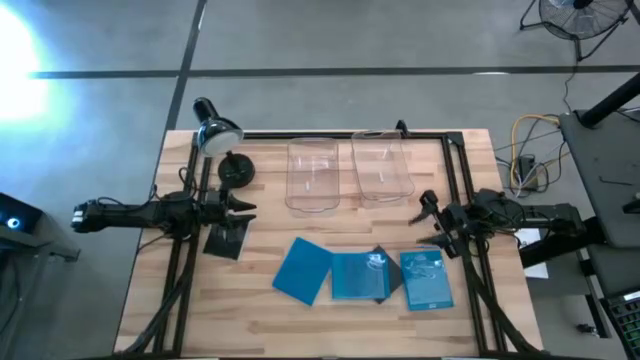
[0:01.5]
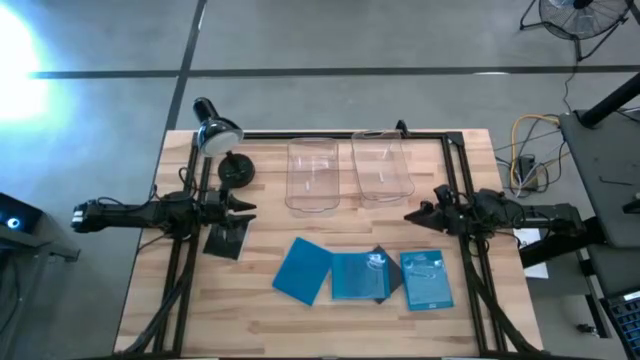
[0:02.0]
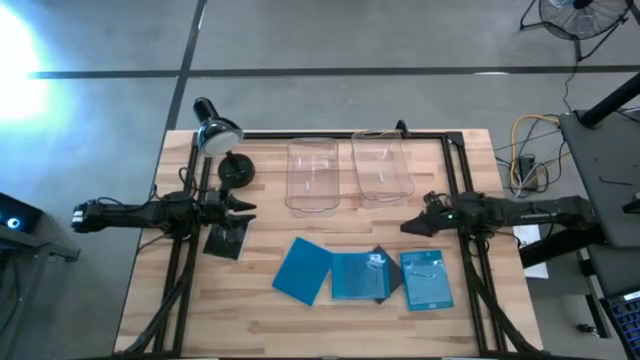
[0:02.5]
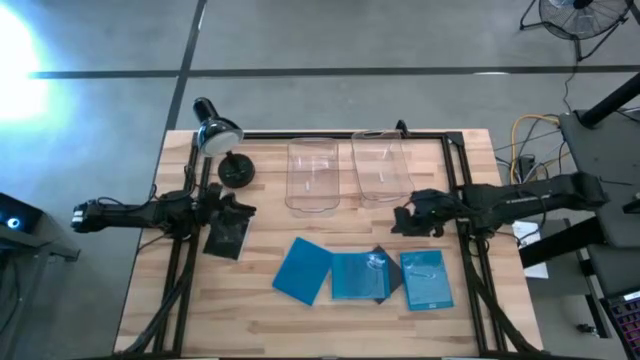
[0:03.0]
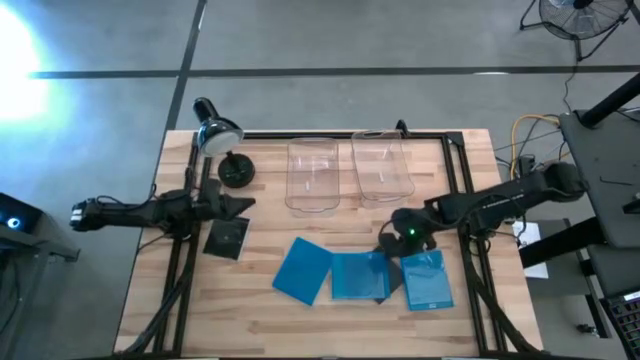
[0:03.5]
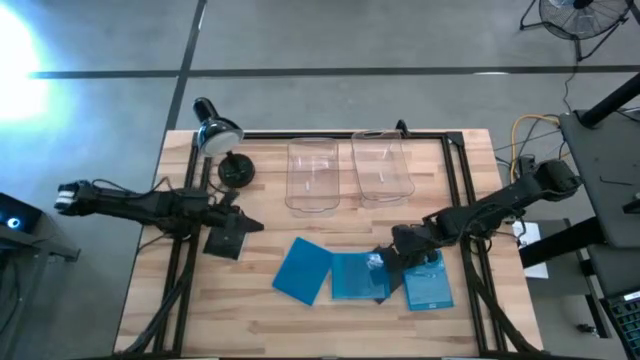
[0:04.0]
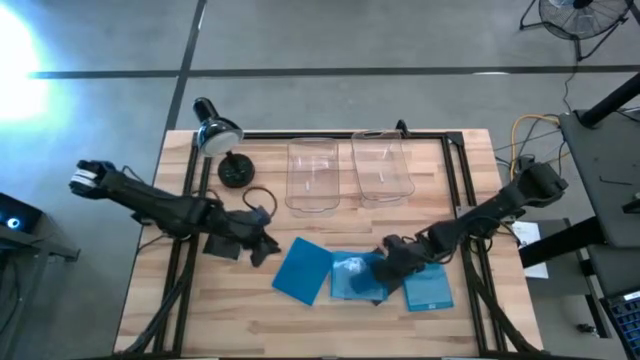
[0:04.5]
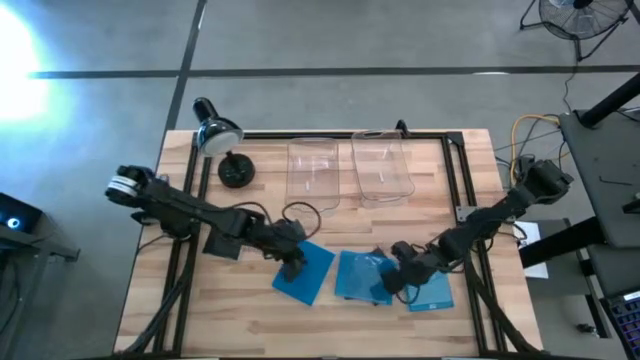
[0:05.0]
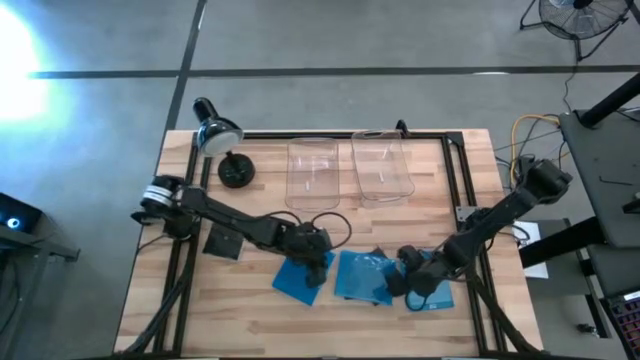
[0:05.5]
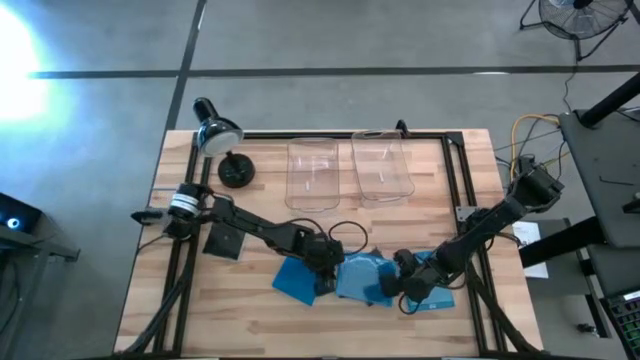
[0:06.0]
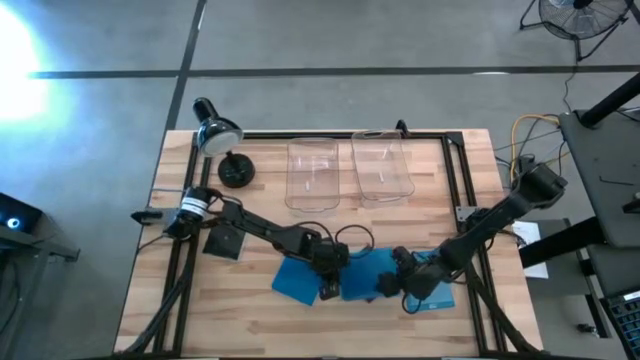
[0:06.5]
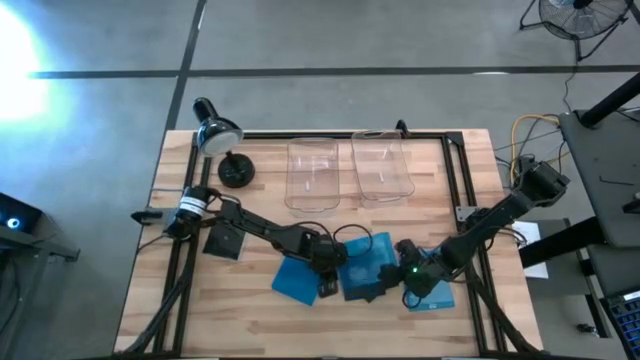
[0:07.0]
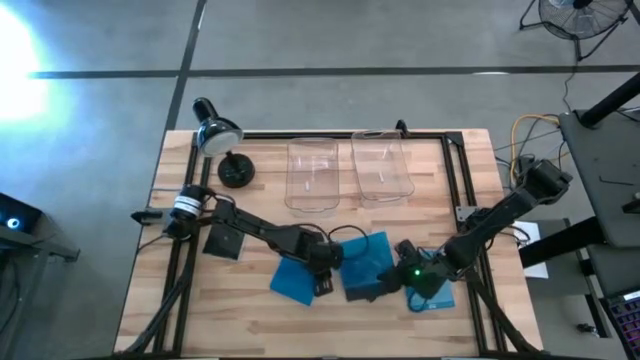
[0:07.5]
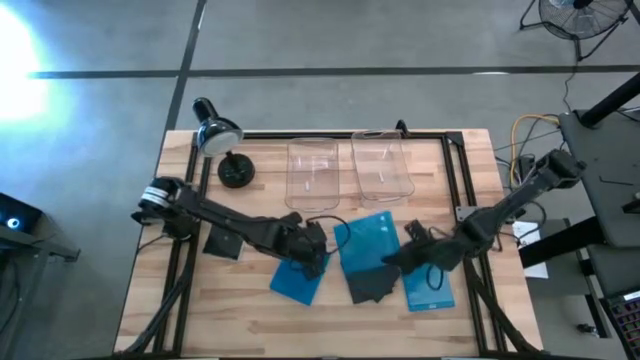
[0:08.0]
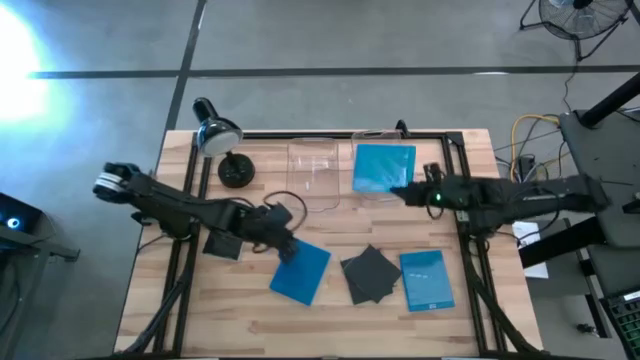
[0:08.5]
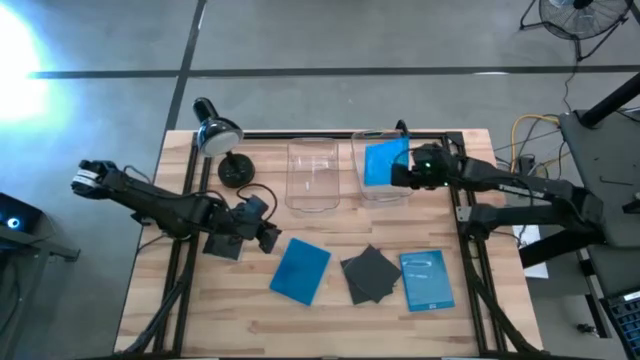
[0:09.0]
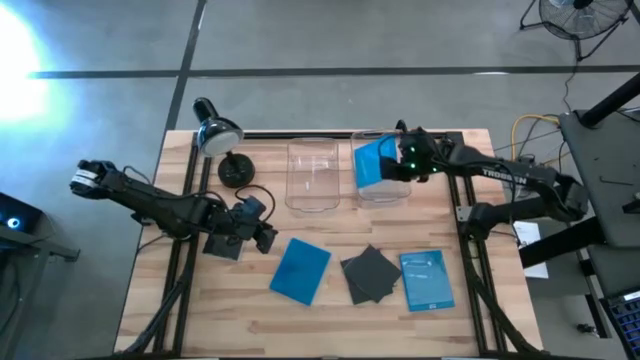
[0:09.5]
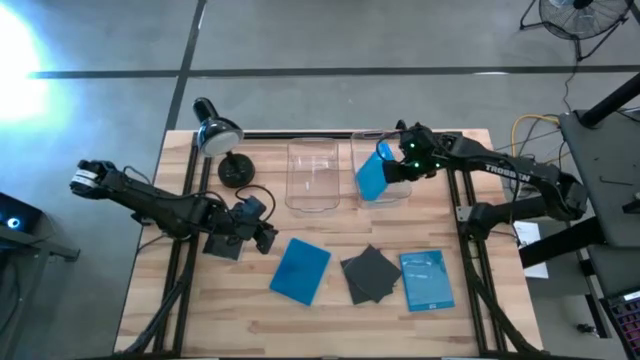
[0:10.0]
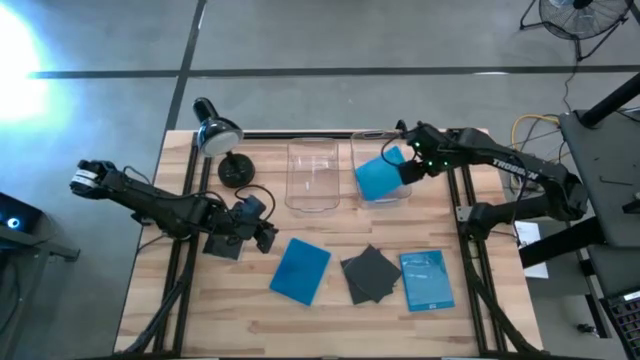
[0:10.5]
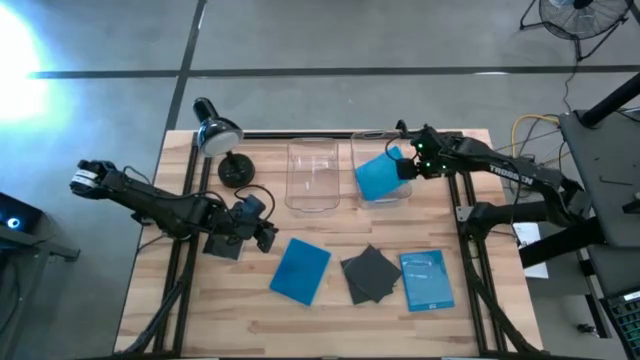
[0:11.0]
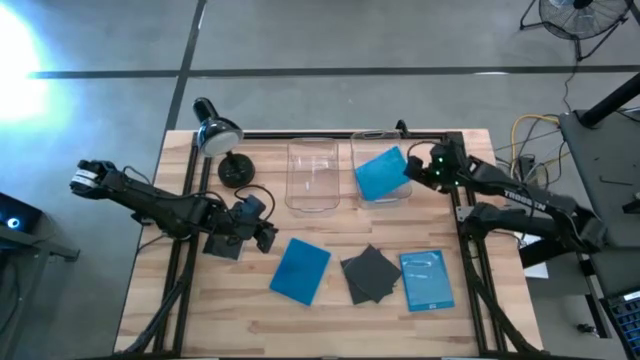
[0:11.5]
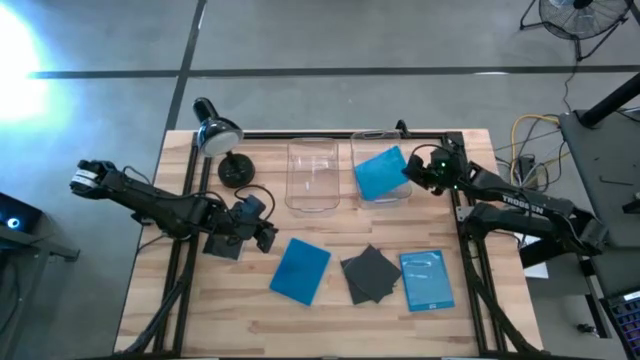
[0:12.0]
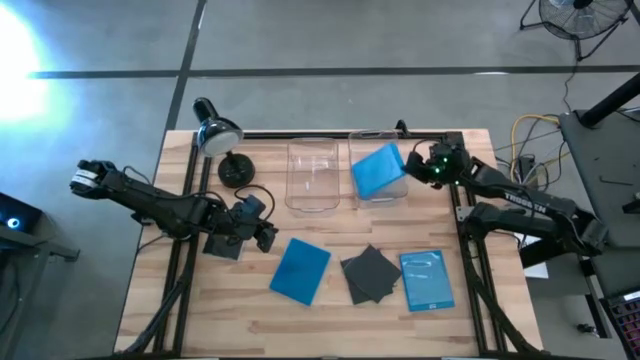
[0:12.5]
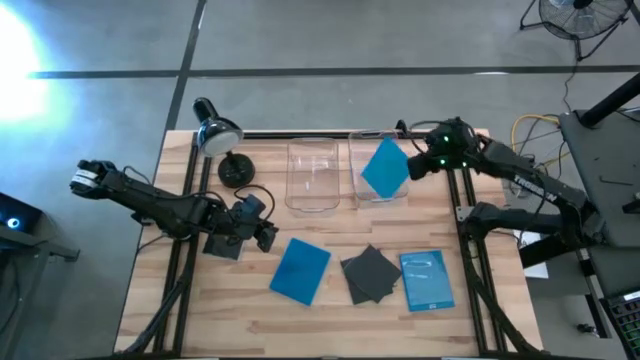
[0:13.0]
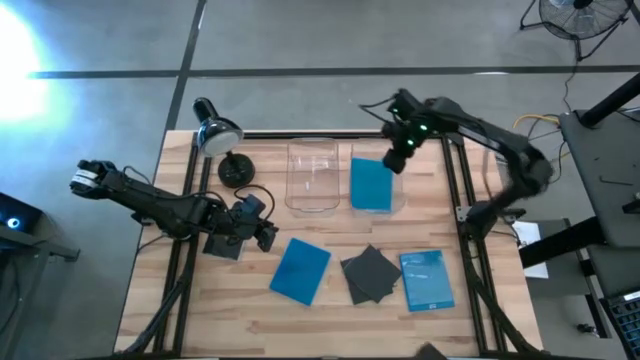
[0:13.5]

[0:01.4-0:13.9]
Task: Pick & place jewel cases by type
Put the blue CD case into the right transparent bin

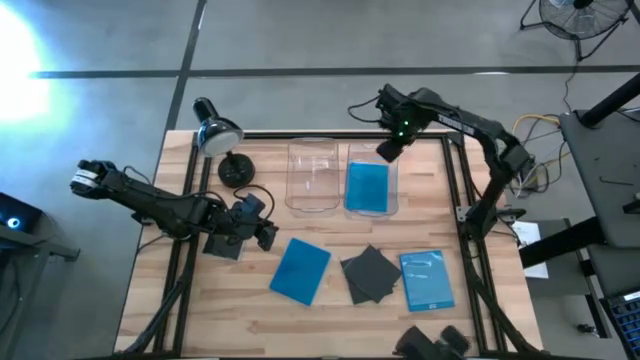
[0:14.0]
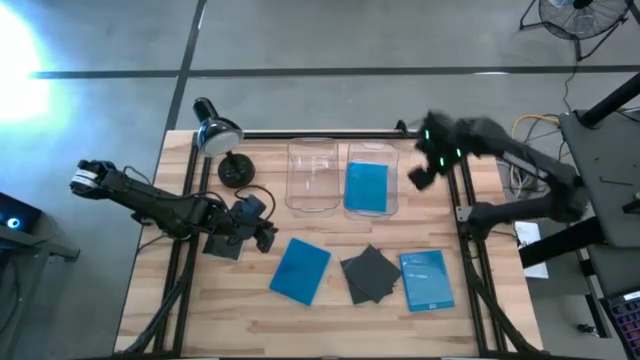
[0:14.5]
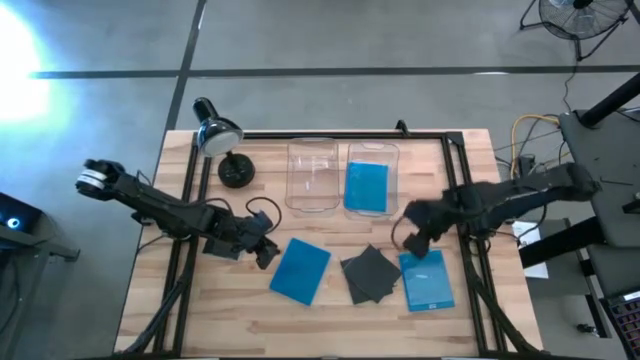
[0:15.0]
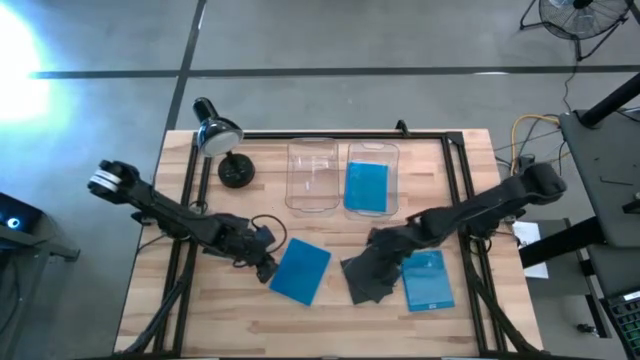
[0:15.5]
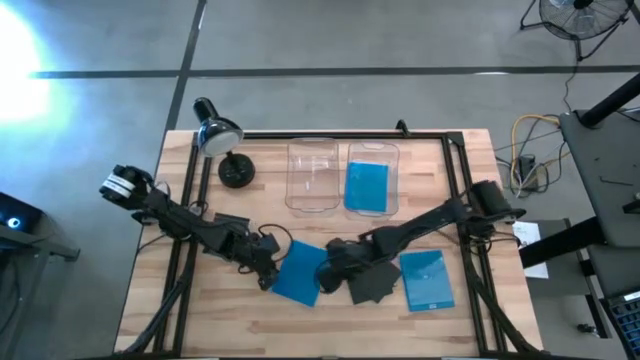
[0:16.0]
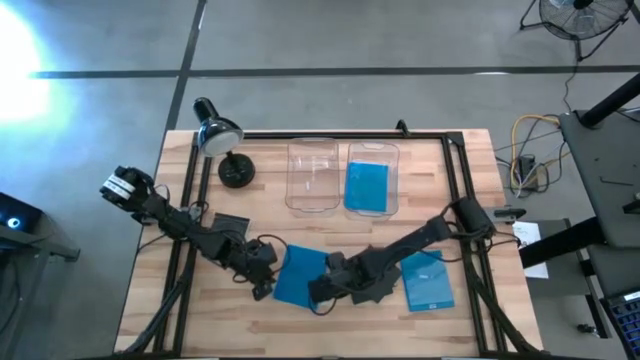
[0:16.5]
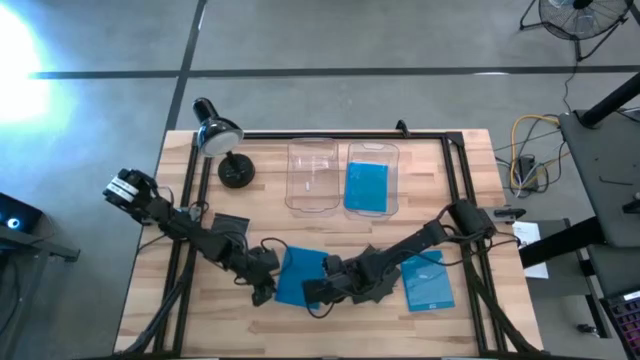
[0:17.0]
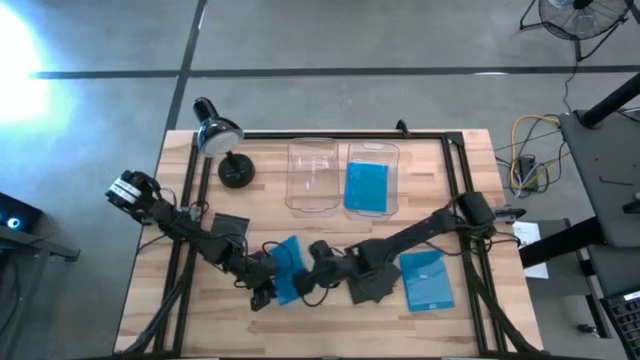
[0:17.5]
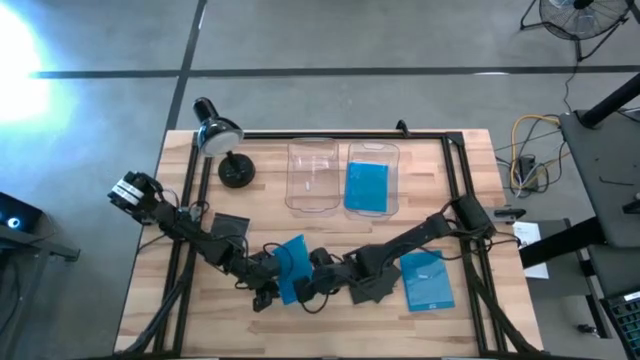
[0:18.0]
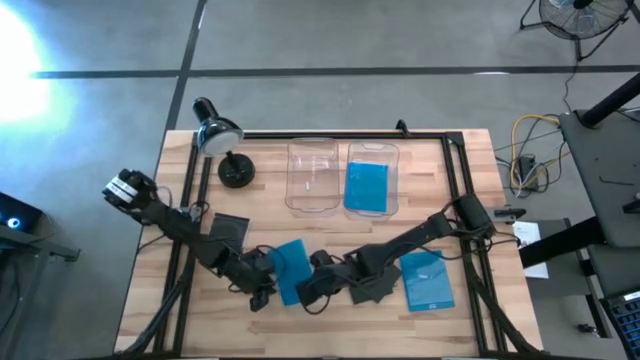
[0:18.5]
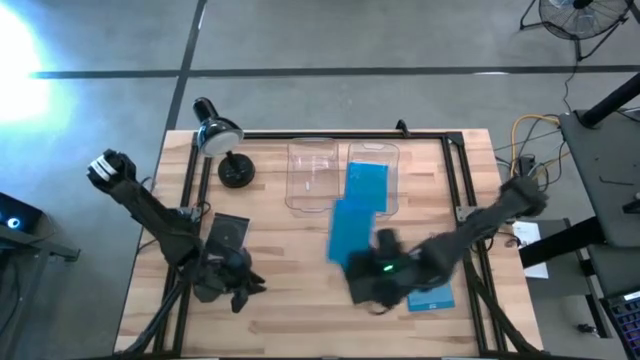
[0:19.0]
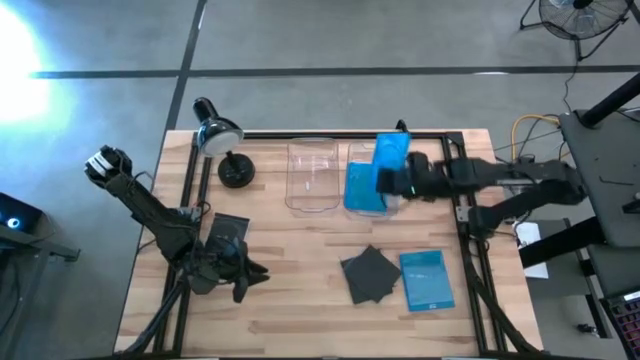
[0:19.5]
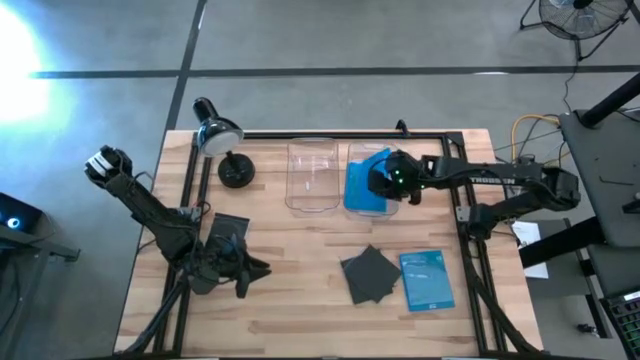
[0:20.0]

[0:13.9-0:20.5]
Put the blue CD case into the right transparent bin

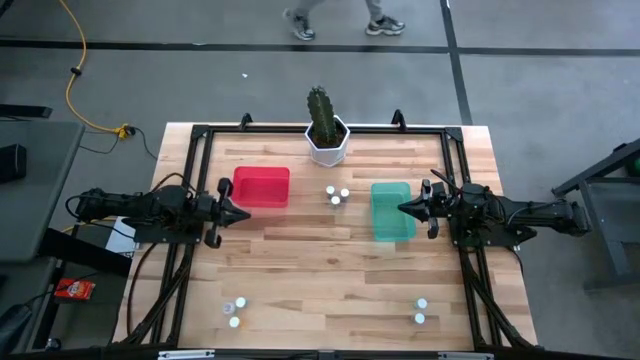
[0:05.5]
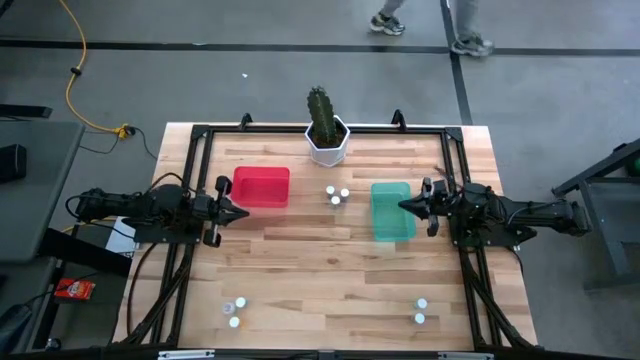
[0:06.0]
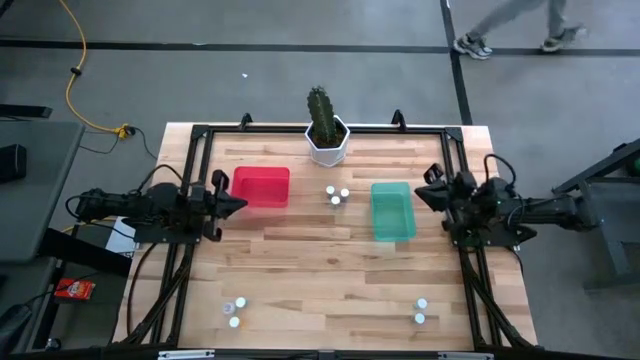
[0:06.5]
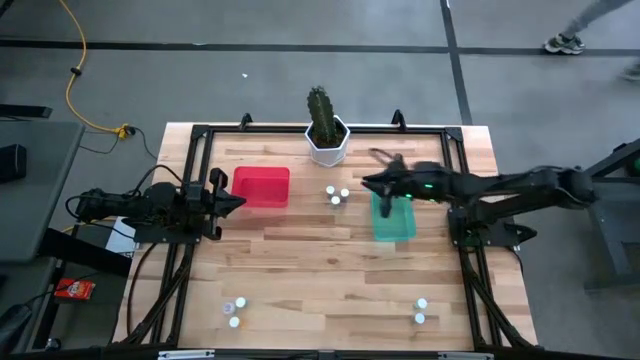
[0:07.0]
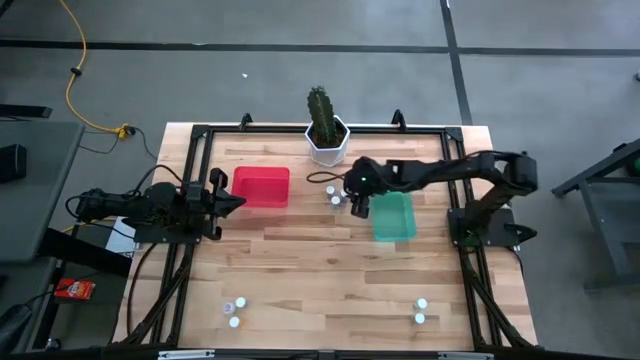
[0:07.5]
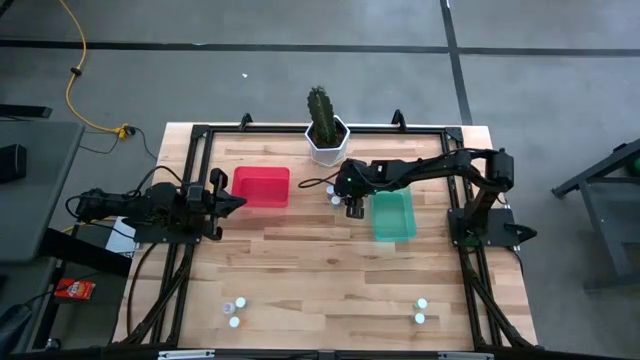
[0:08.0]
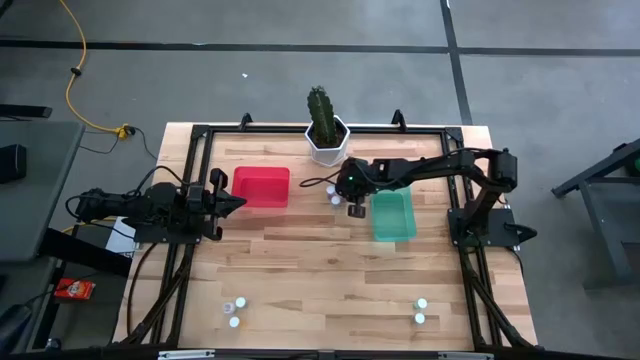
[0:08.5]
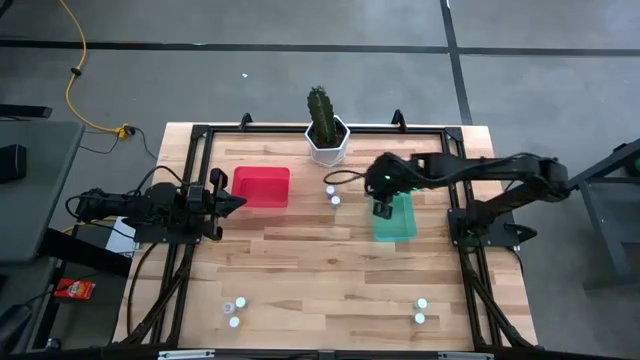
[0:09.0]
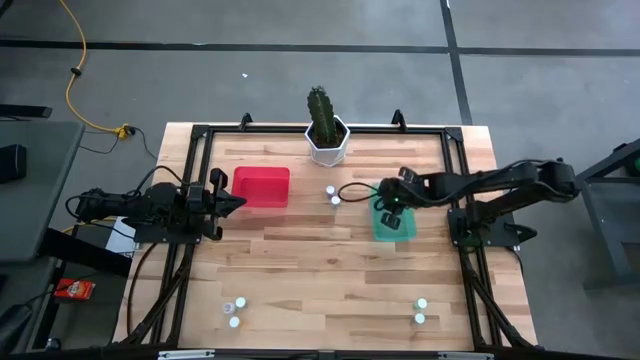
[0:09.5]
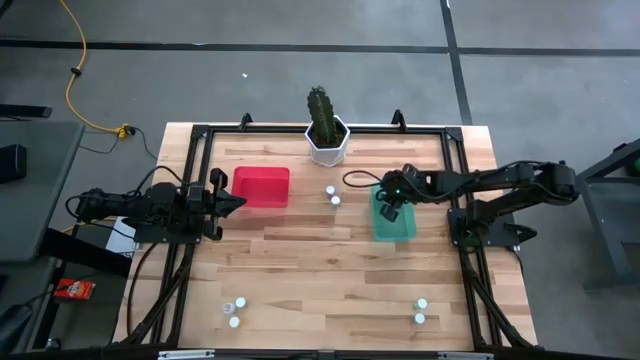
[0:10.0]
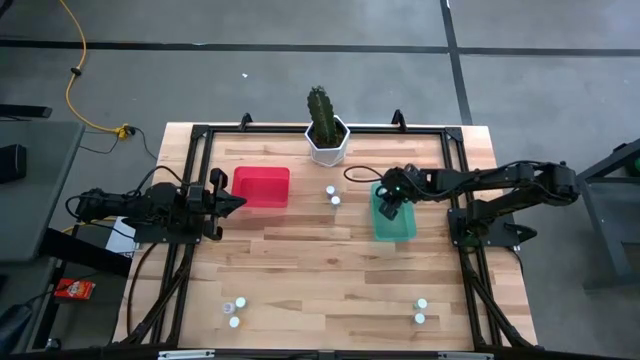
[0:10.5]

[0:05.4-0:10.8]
Task: Pick and place medicine bottles into bin by pill shape (circle, oval)
Put the top right blue capsule bottle into the green bin
